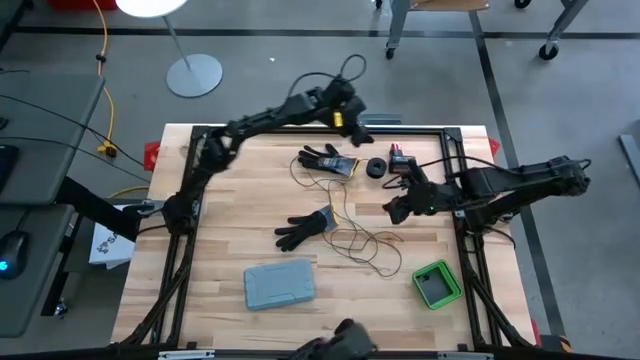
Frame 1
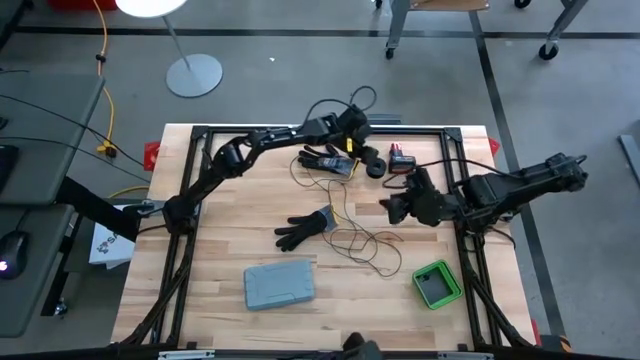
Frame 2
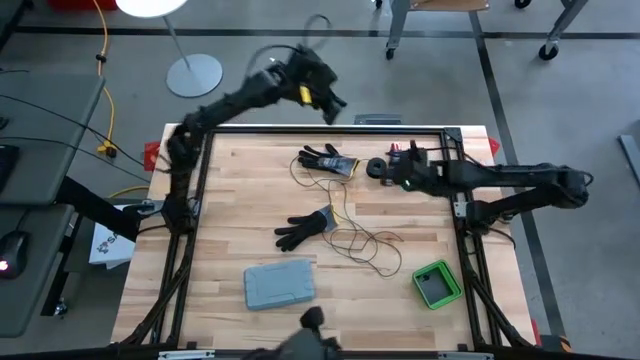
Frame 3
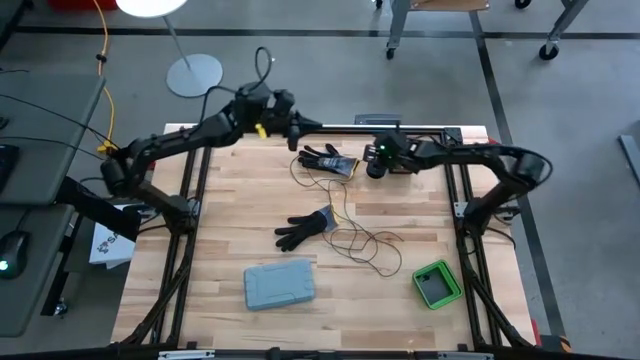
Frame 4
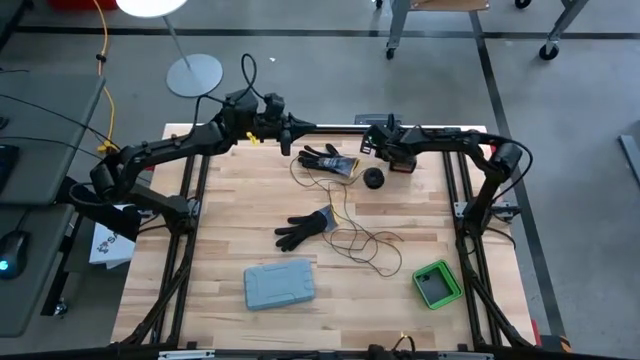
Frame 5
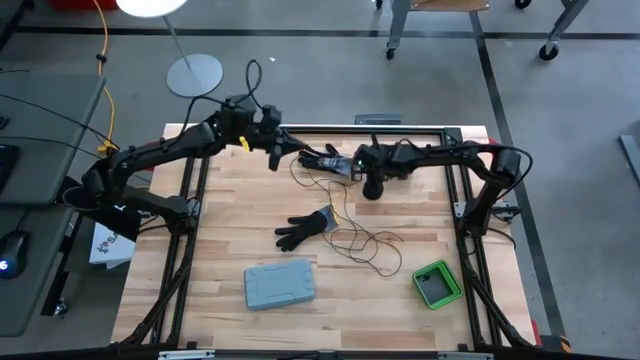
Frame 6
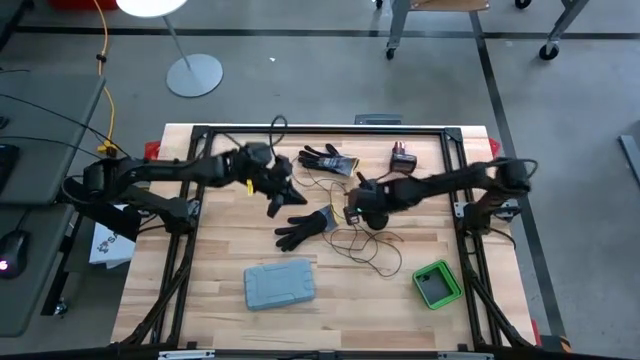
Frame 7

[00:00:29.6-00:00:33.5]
Task: Coil cords
Move the black wire cable to the middle right of the table

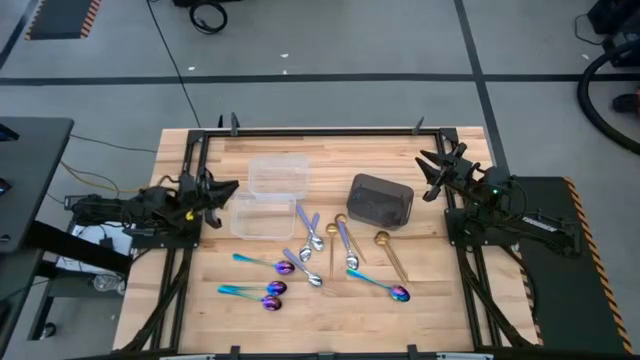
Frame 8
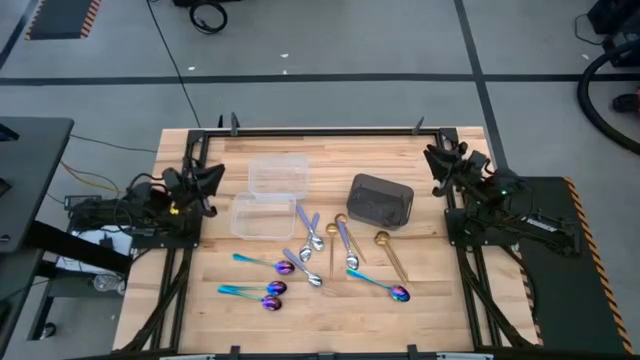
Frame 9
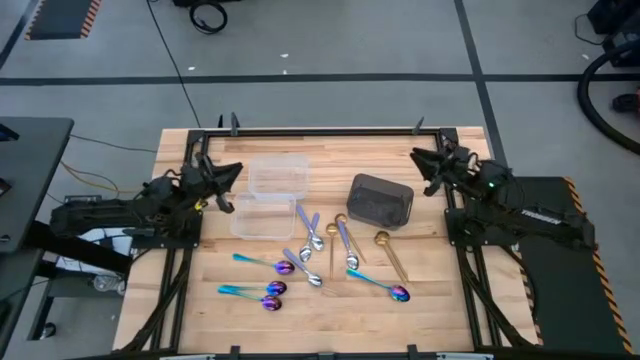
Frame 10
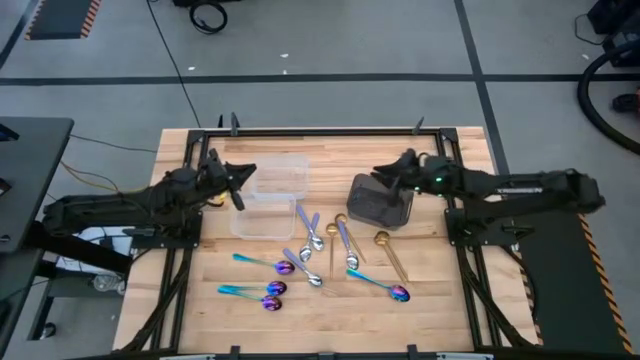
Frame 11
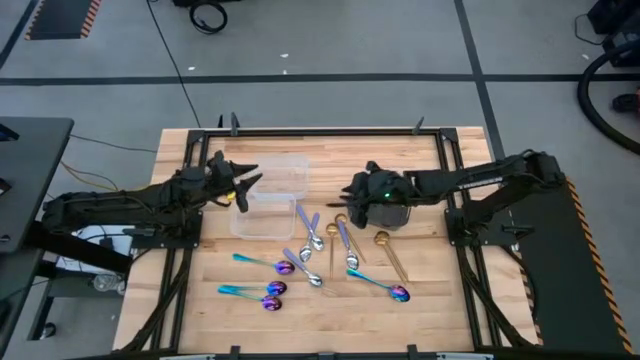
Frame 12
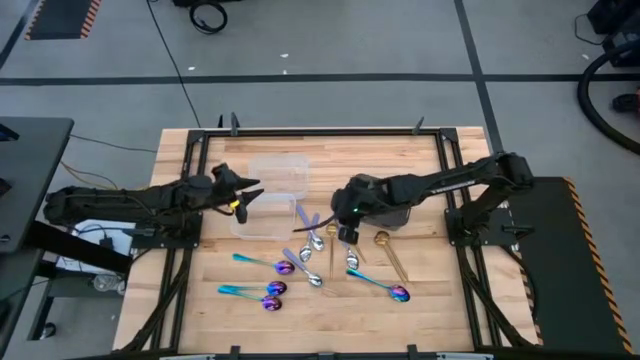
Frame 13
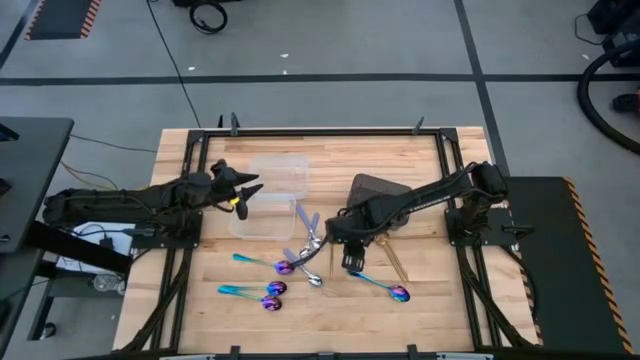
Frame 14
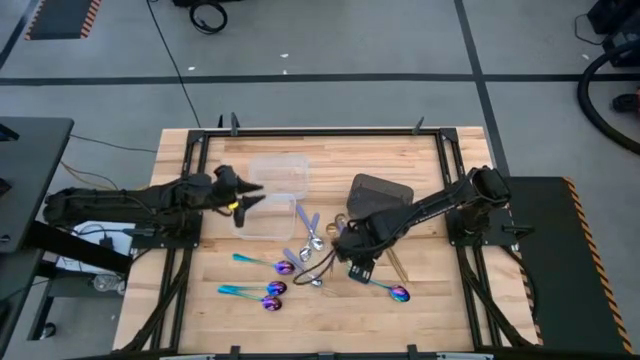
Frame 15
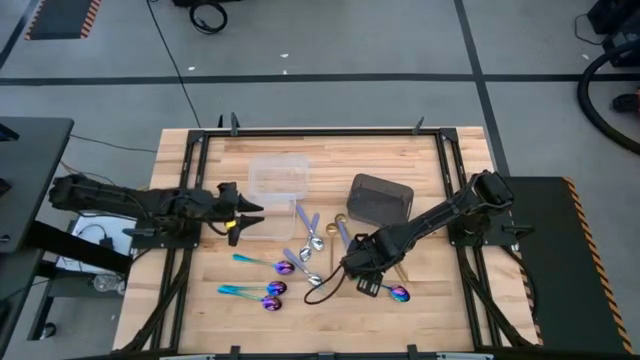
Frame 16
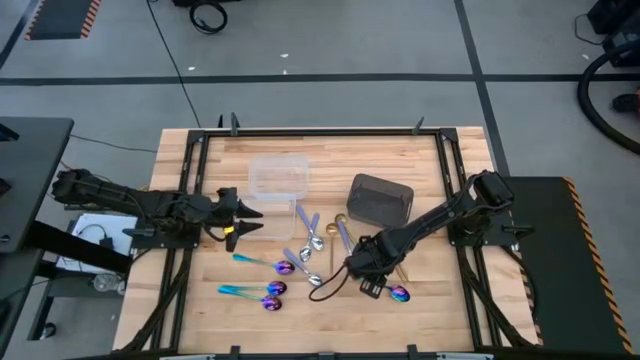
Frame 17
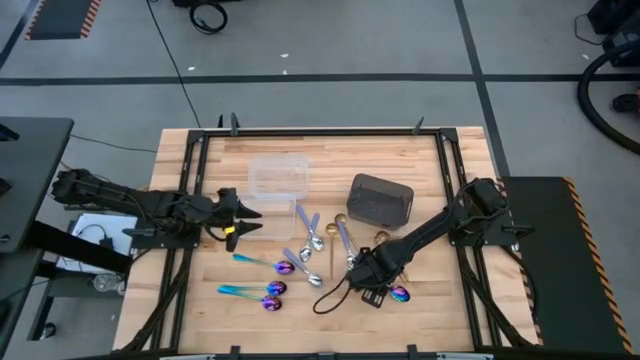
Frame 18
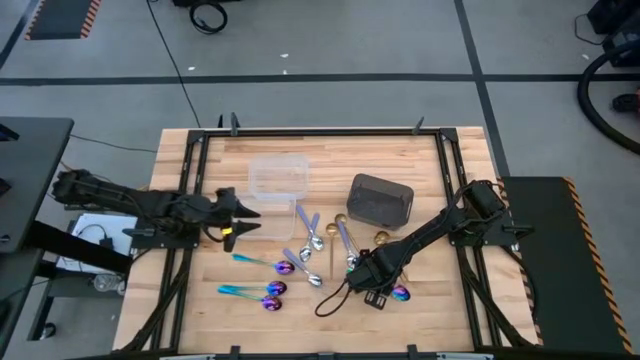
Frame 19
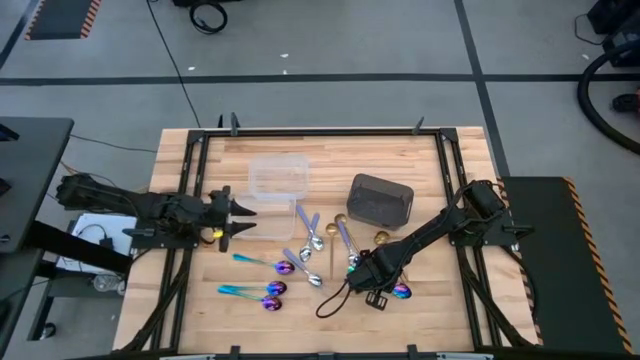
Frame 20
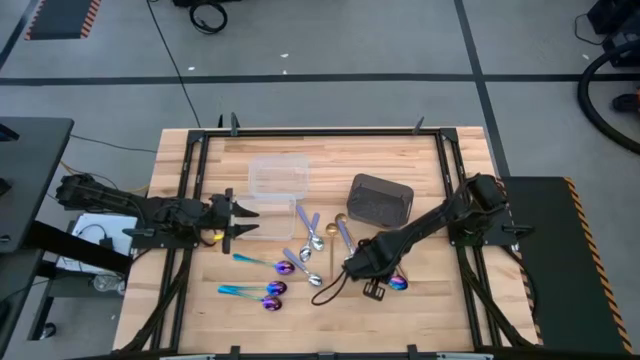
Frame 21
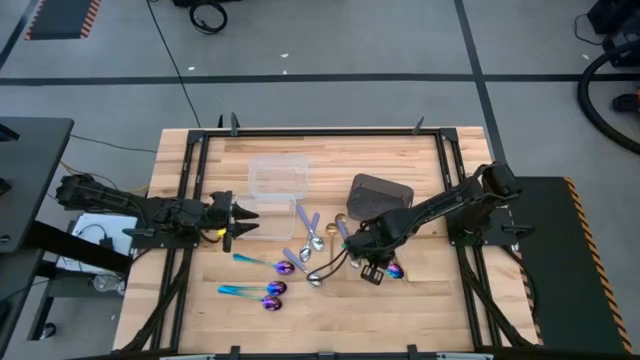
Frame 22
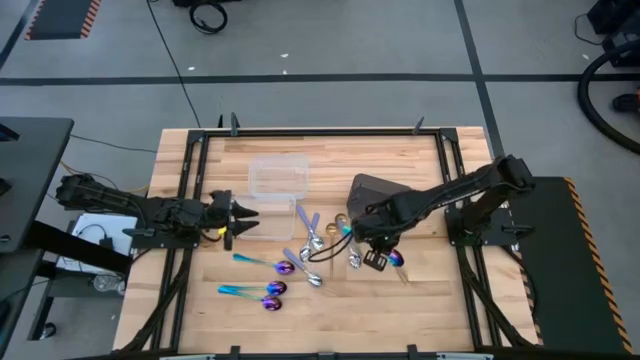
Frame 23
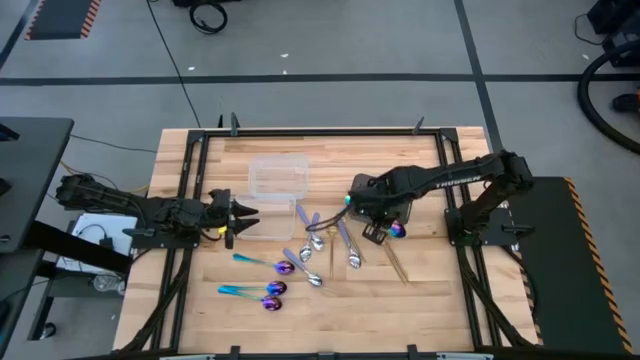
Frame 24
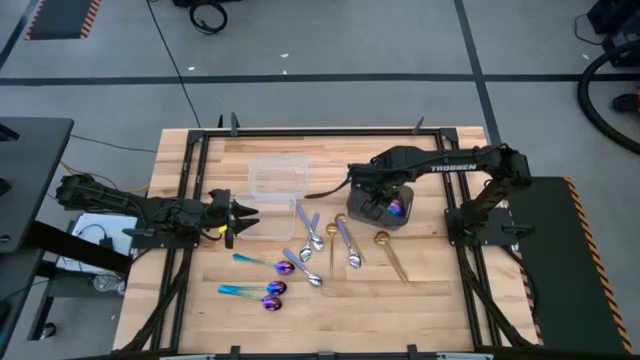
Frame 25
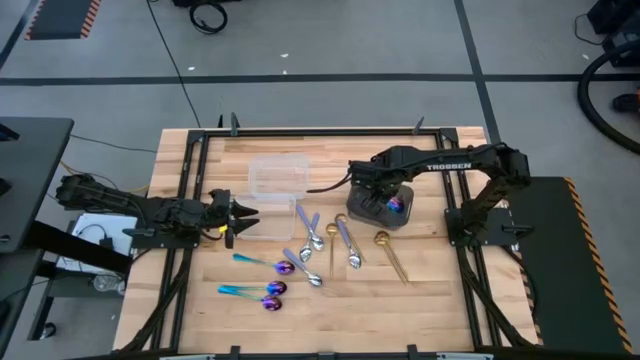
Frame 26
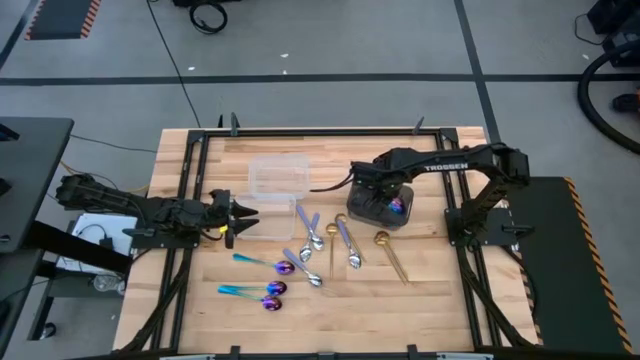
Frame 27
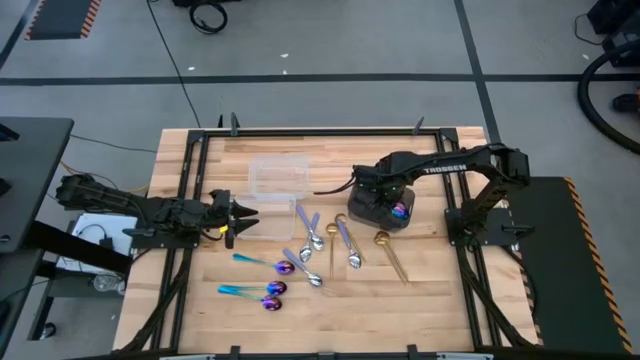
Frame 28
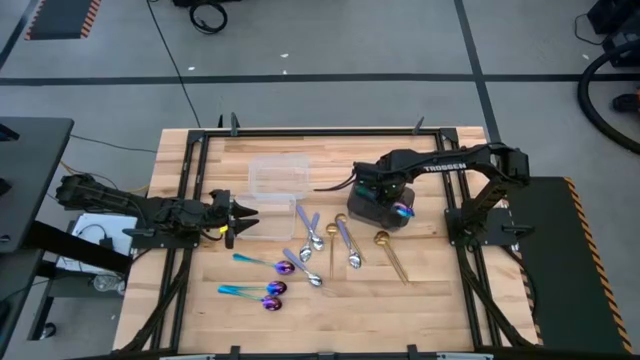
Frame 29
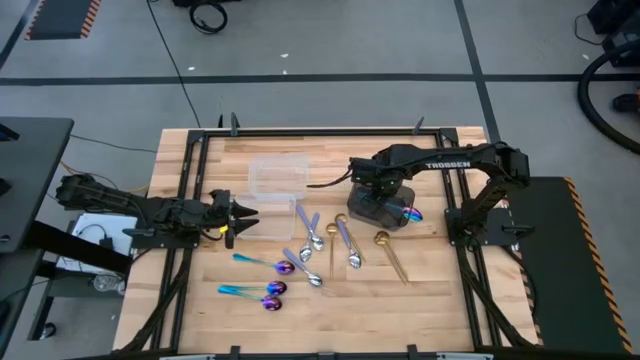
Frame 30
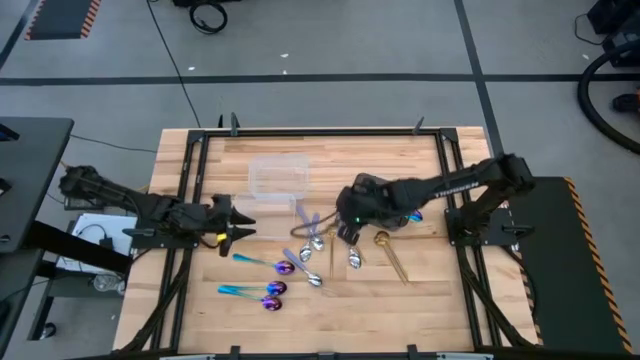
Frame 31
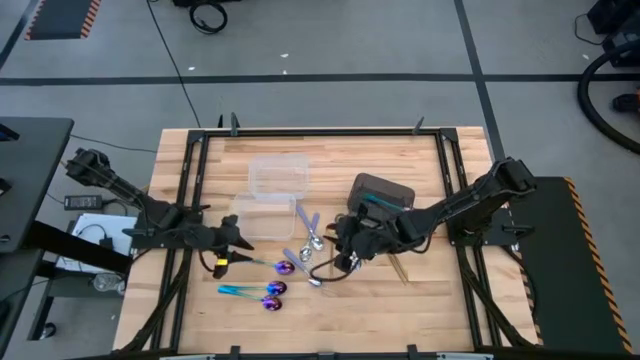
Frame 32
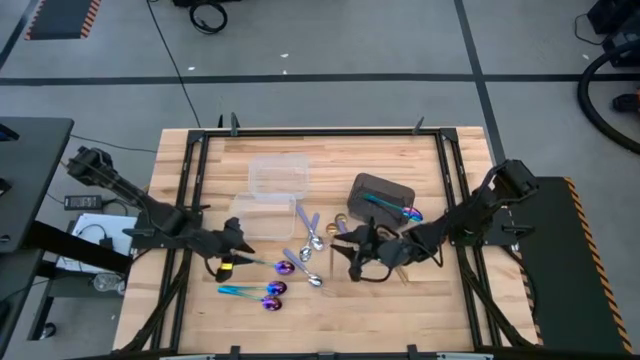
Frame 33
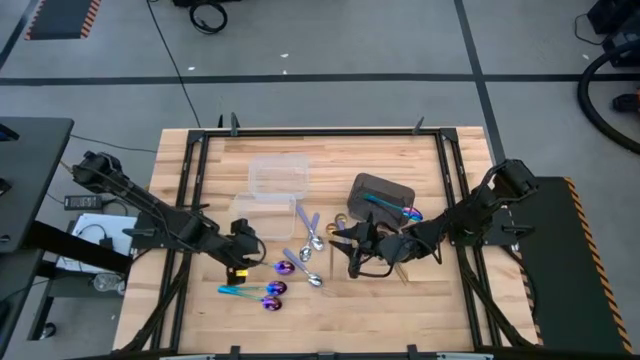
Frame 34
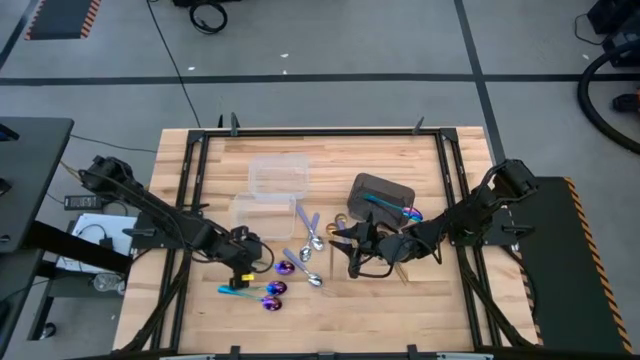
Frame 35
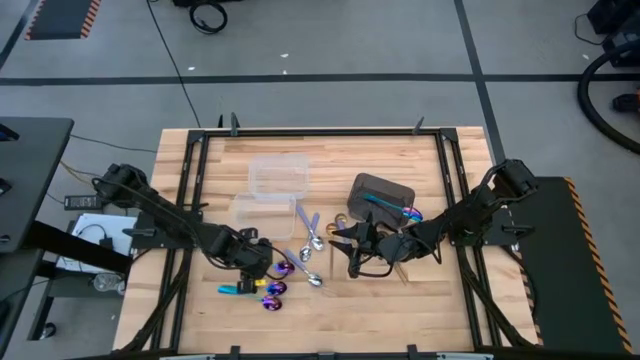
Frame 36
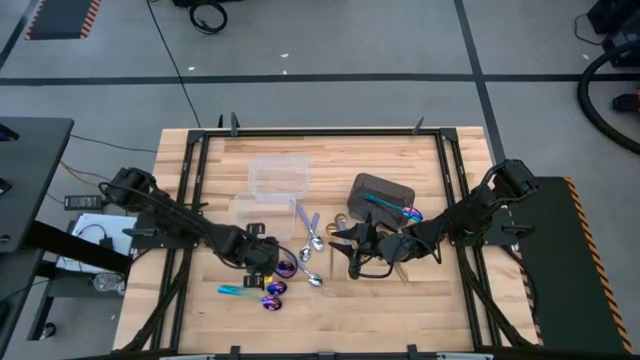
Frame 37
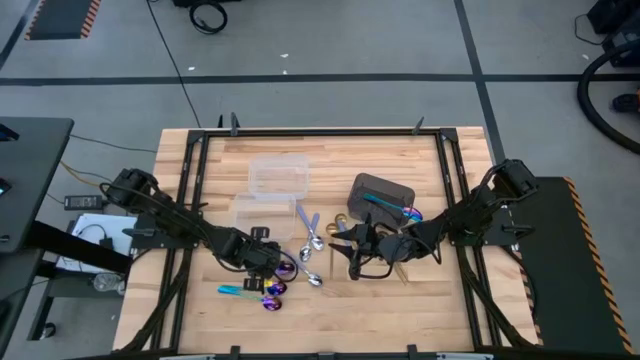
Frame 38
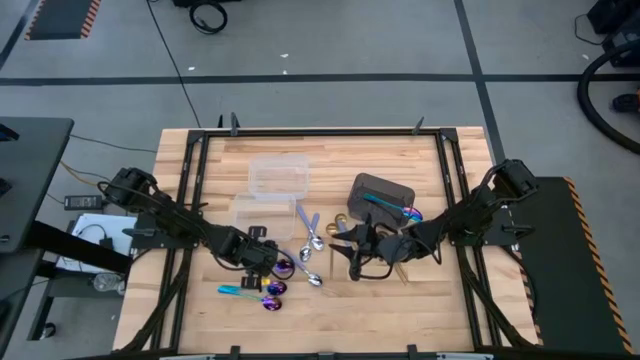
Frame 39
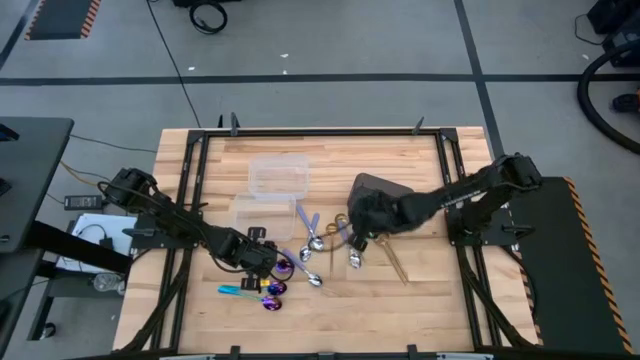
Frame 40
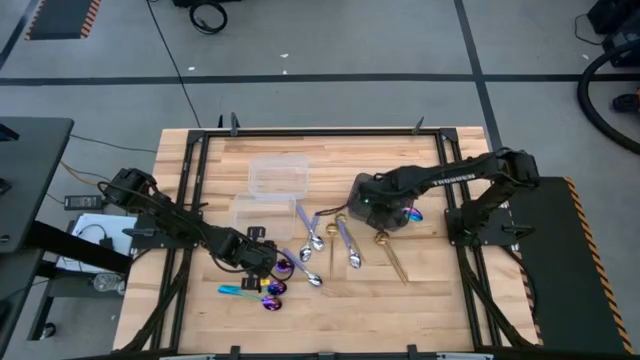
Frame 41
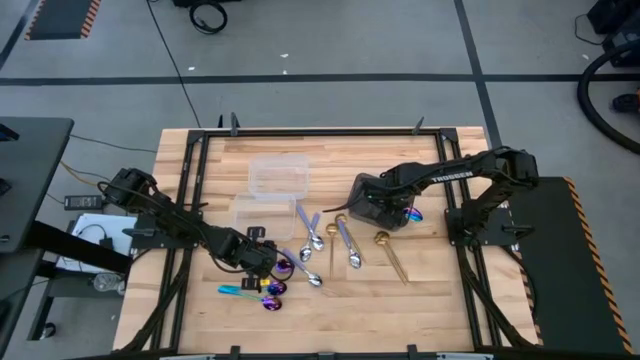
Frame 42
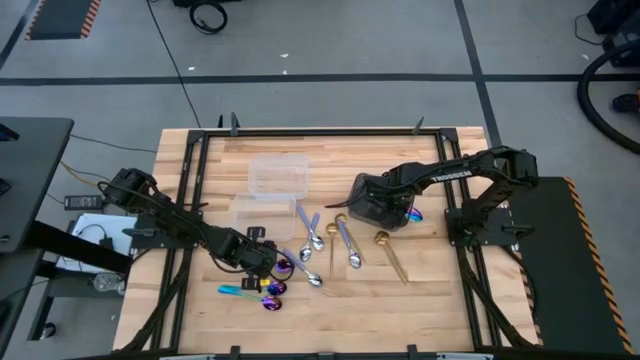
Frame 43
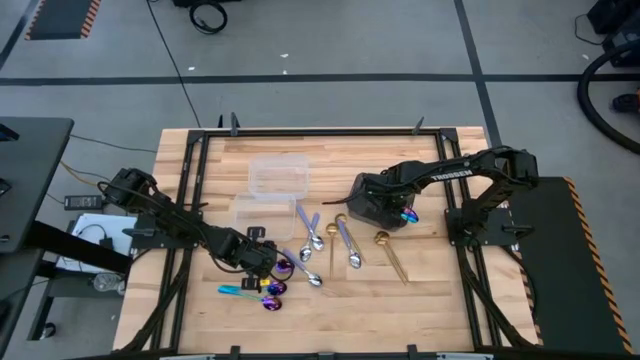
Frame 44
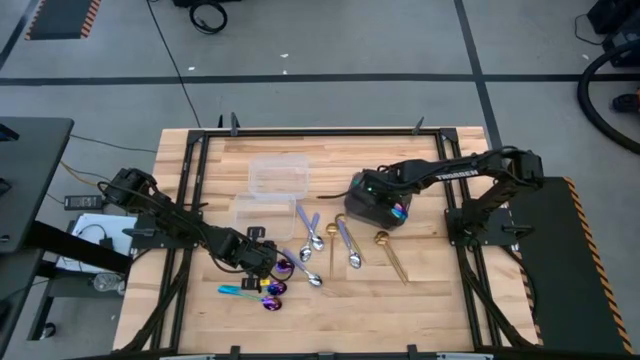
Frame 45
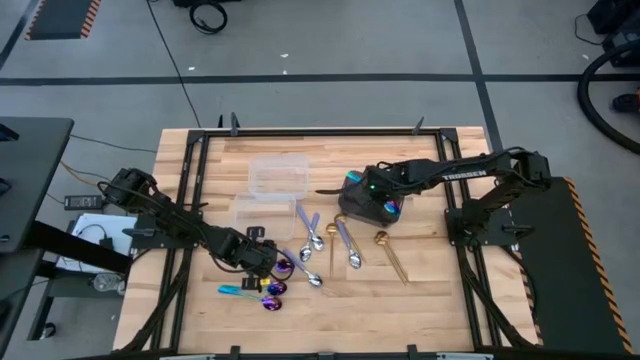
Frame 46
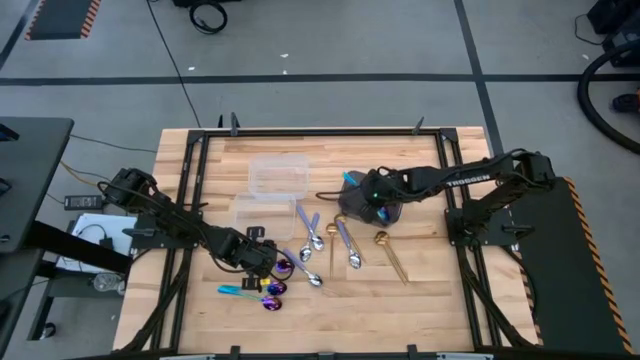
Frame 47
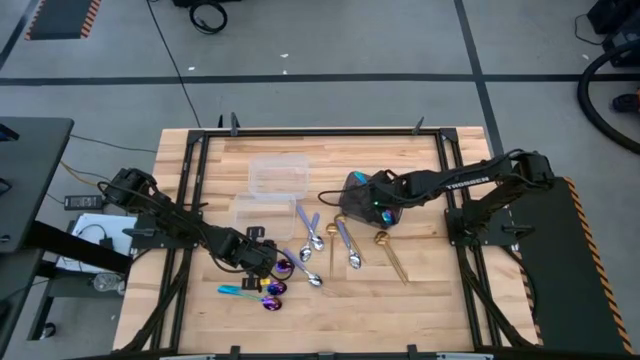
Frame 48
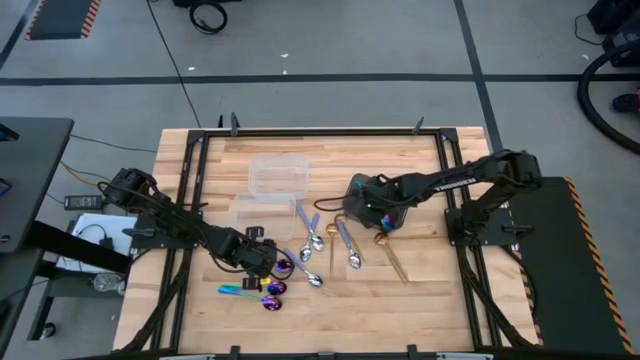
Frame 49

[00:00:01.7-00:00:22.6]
Task: Sort silverware by color (type)
Put the purple spoon into the black bin
